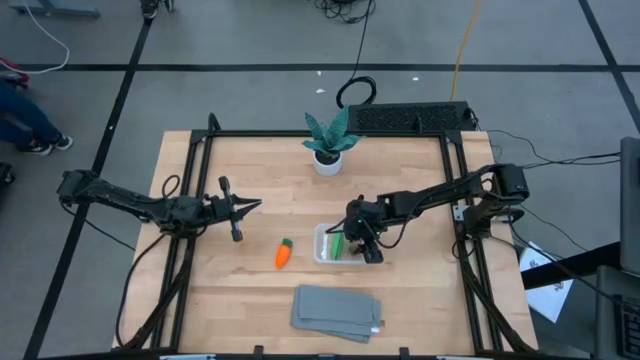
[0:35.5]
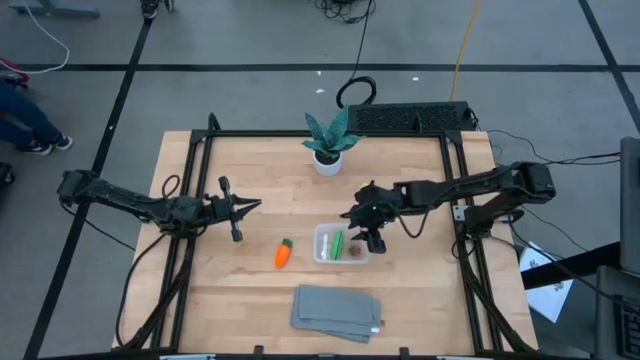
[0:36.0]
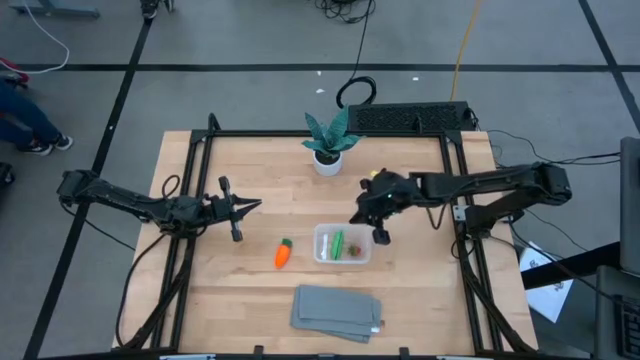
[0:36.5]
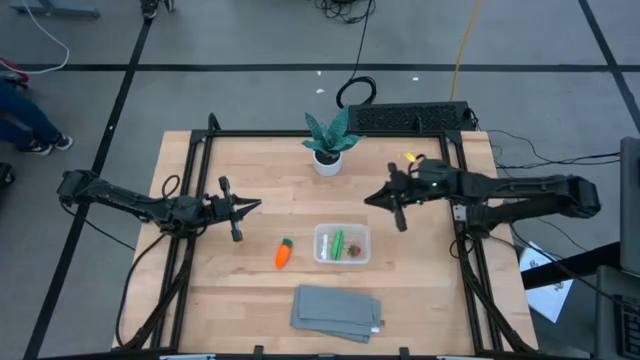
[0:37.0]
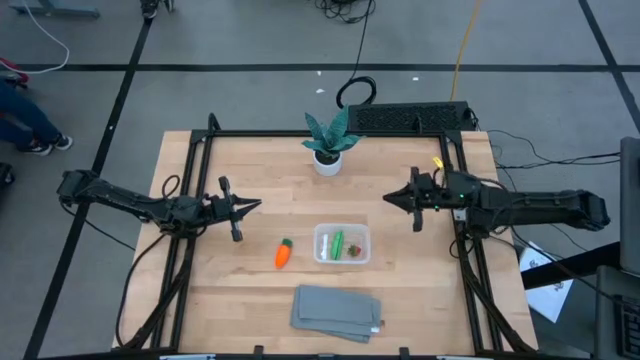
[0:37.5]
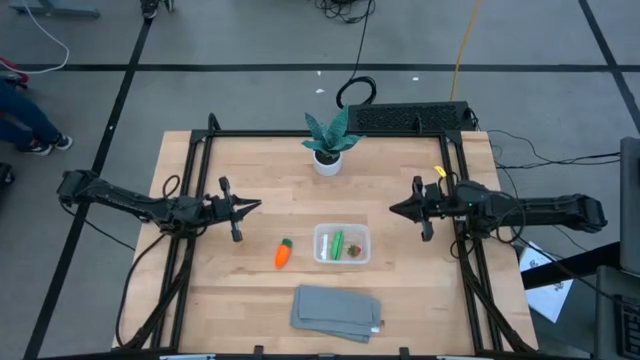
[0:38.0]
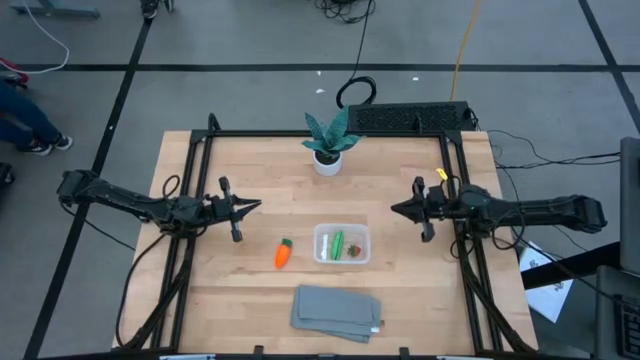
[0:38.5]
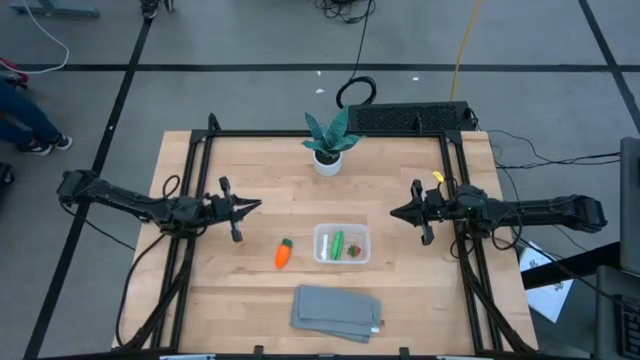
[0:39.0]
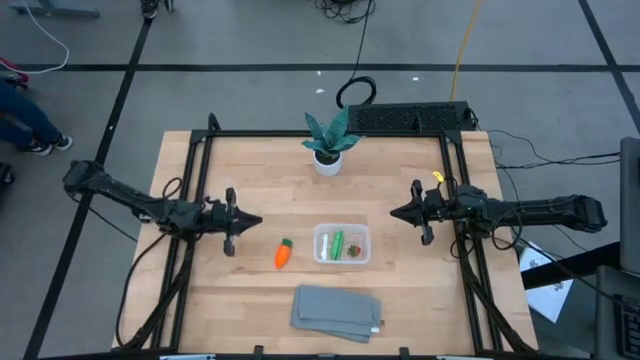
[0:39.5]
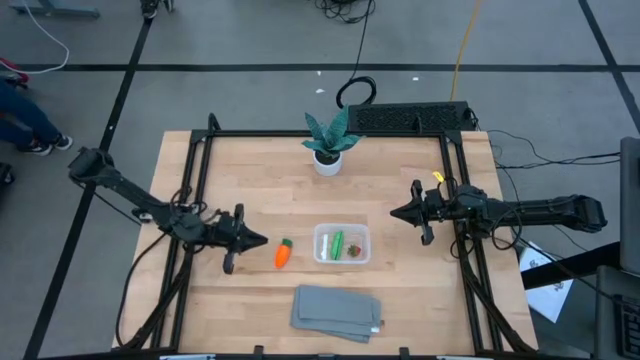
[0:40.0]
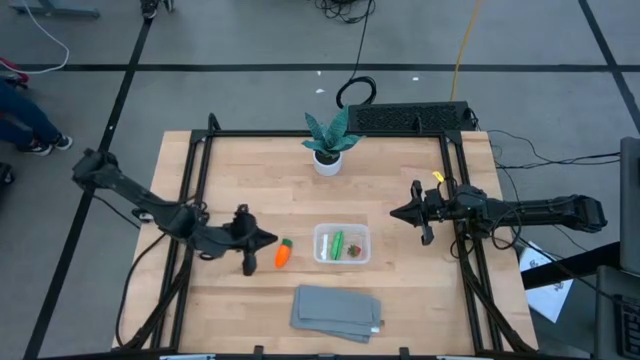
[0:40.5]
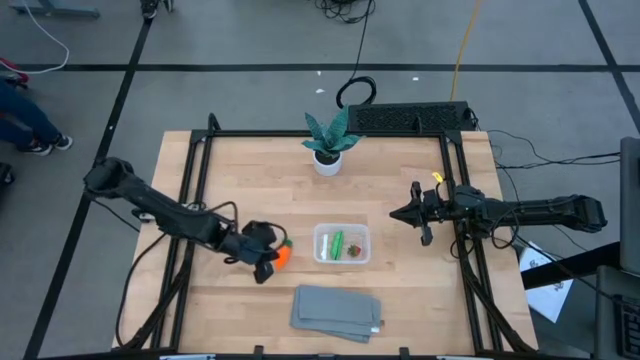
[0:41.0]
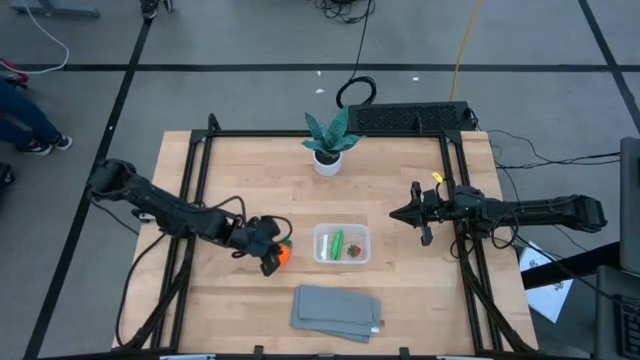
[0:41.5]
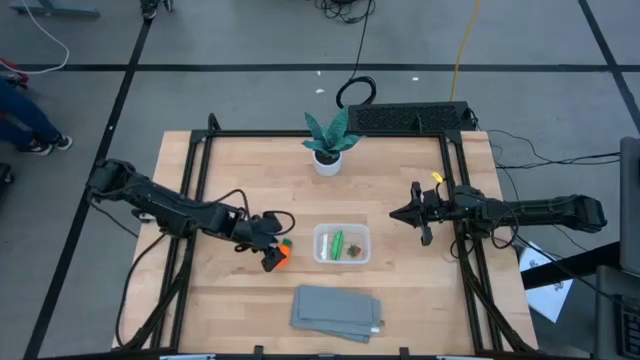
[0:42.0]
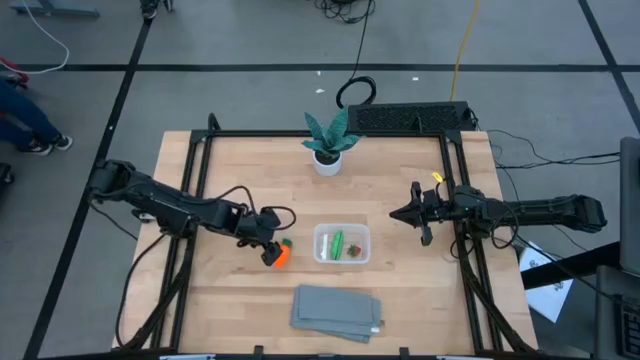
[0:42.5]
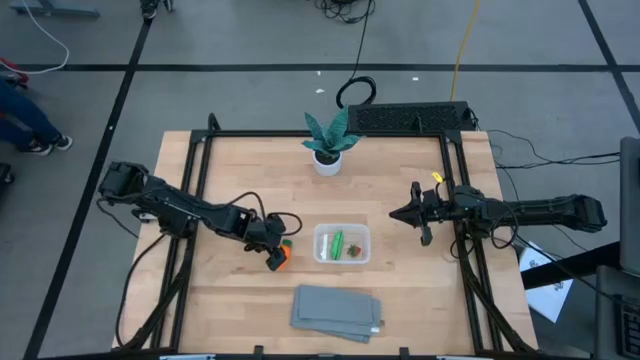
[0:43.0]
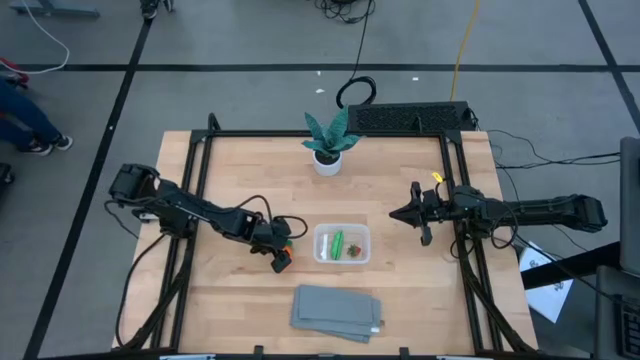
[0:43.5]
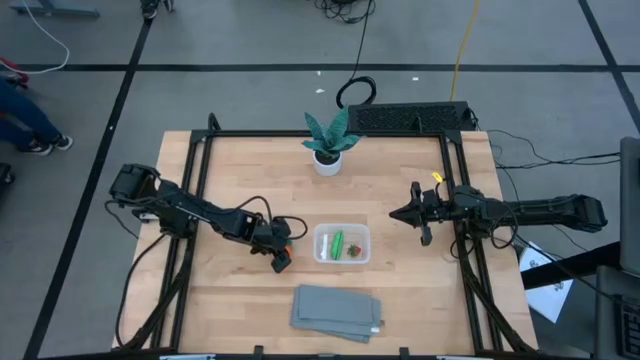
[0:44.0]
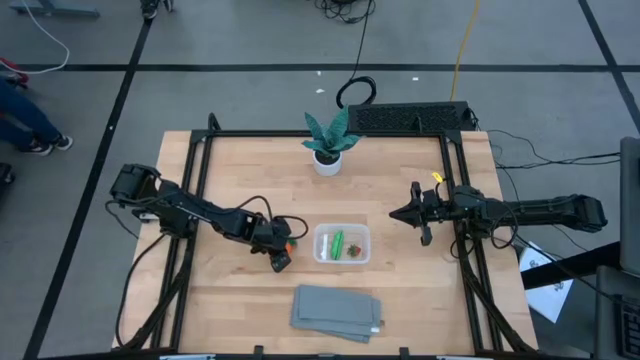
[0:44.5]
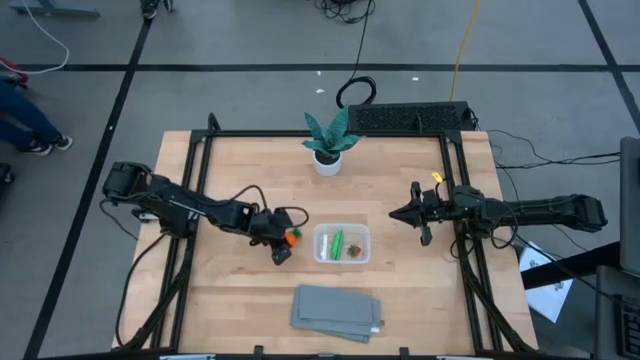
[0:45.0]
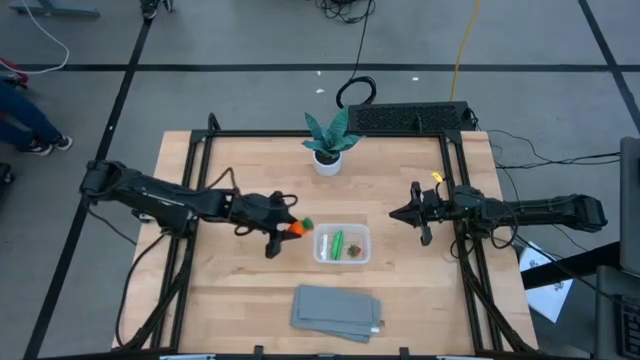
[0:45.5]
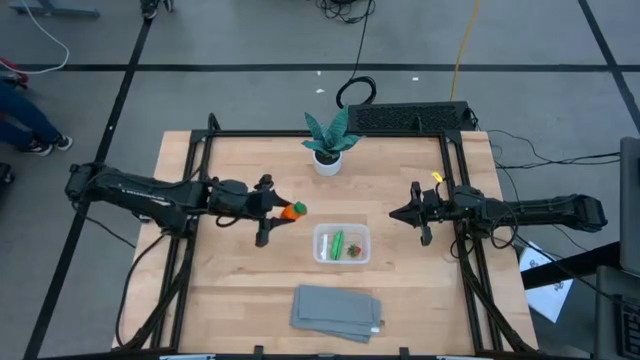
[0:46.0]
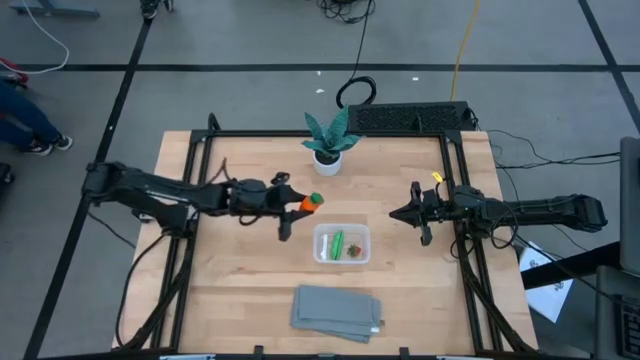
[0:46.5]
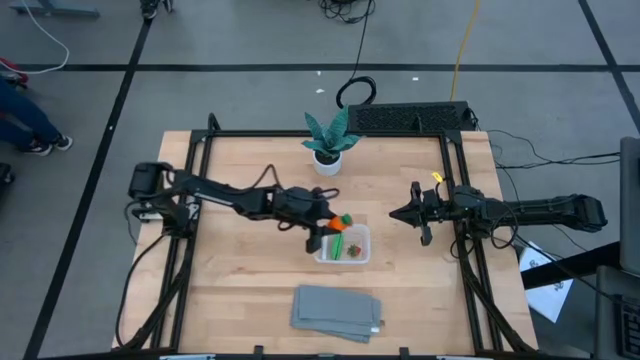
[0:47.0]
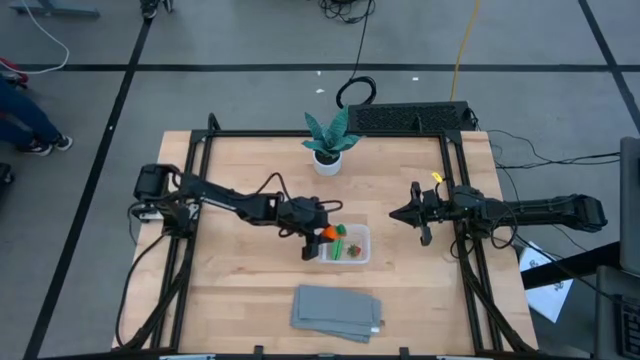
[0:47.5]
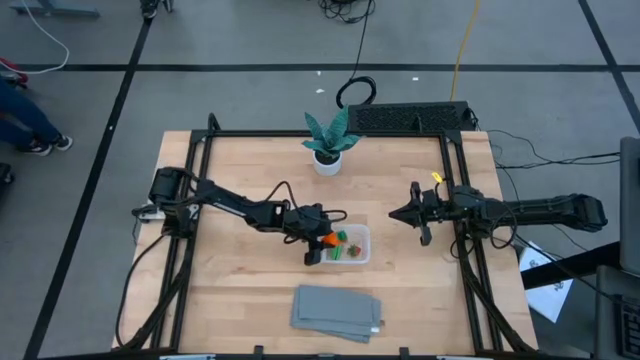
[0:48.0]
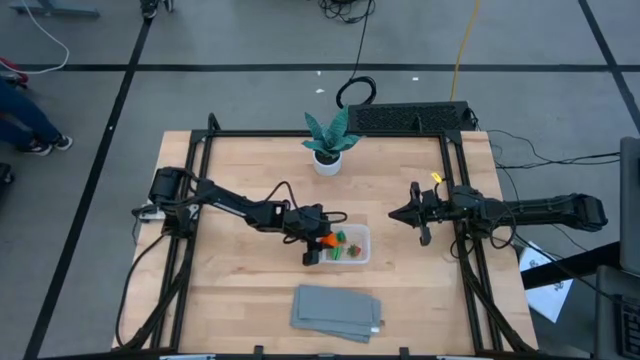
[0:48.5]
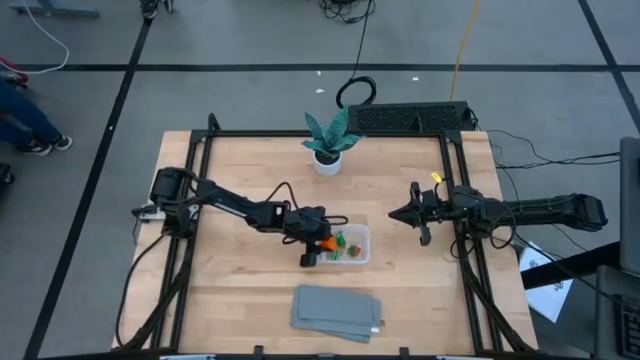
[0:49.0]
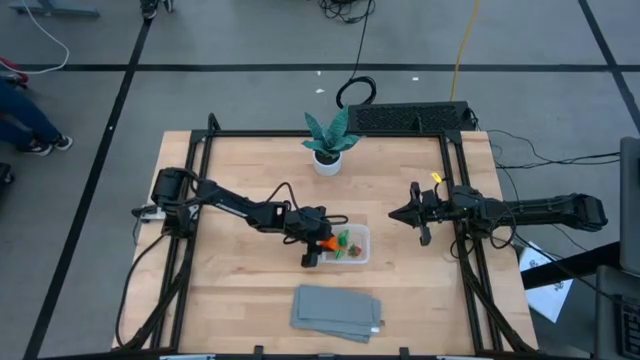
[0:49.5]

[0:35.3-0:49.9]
Task: Pick and placing Produce into tupperware
Put the orange carrot into the transparent container

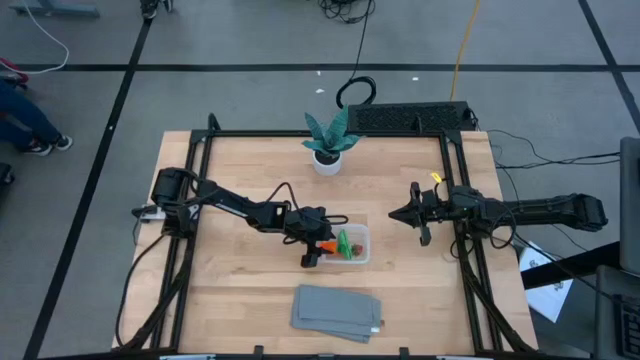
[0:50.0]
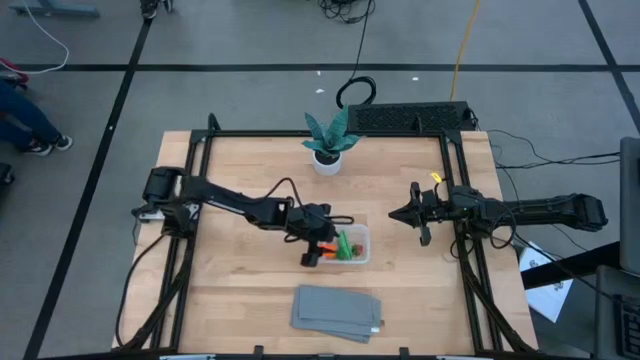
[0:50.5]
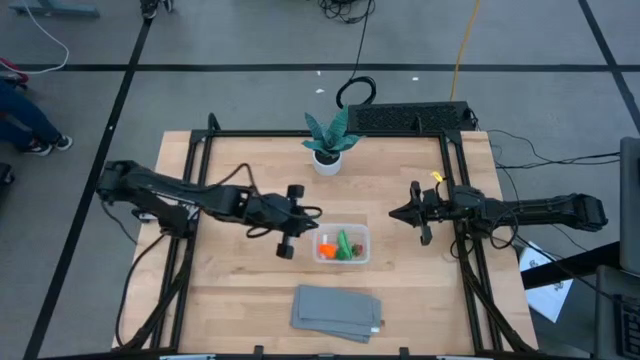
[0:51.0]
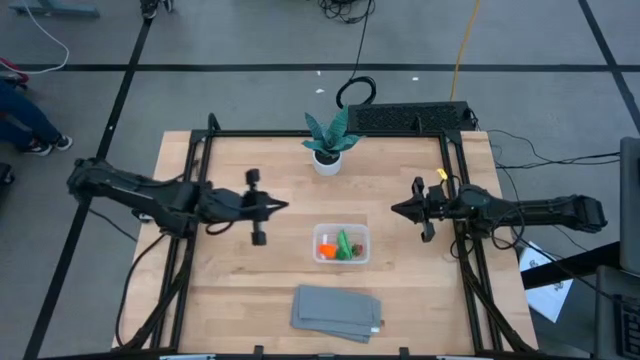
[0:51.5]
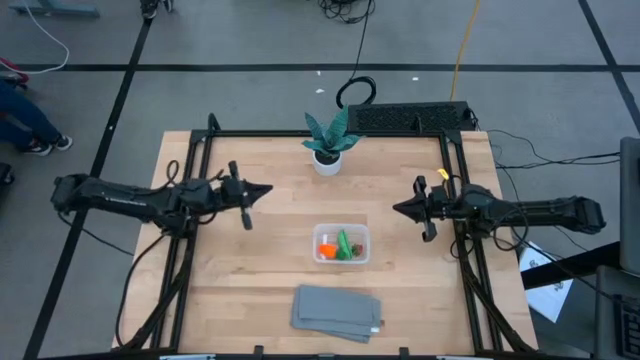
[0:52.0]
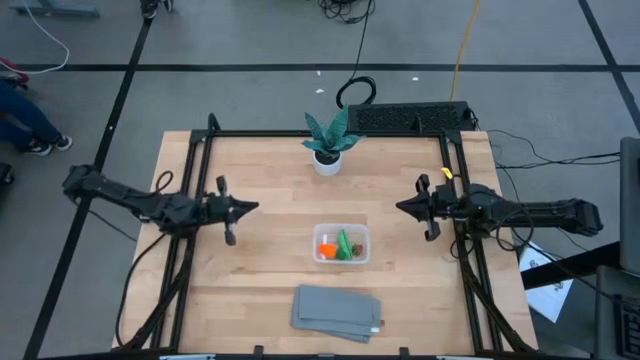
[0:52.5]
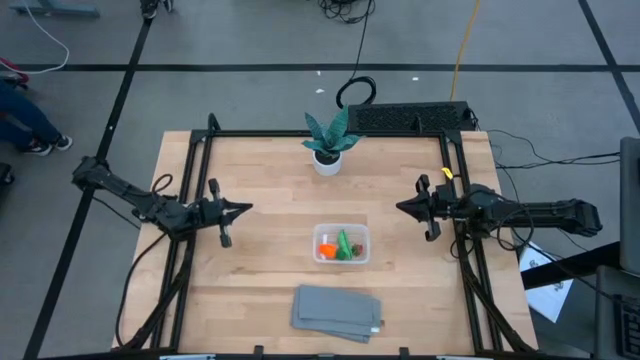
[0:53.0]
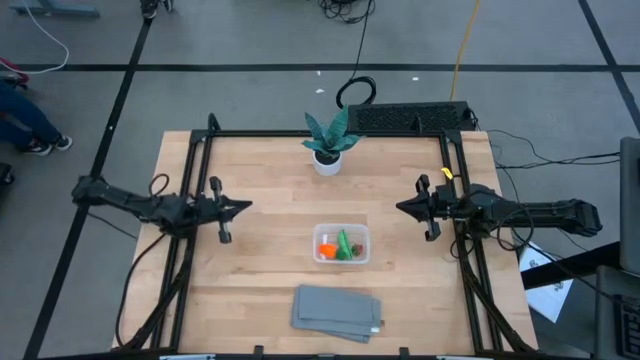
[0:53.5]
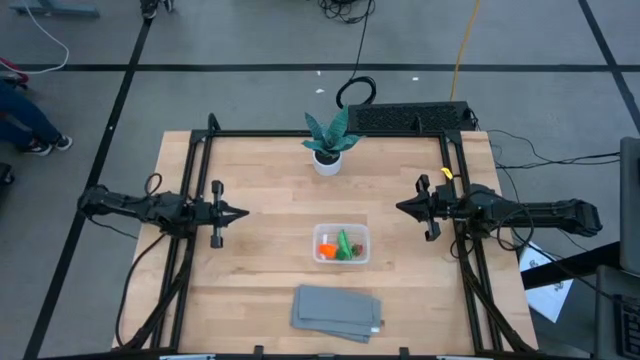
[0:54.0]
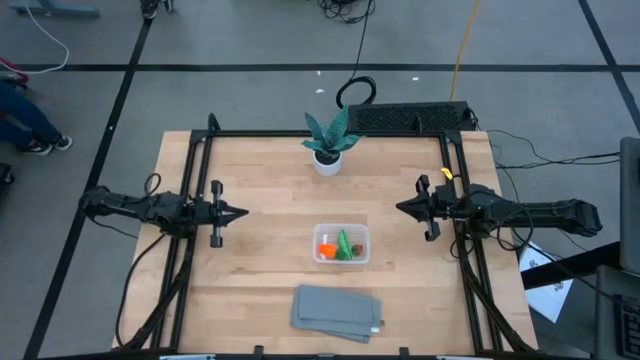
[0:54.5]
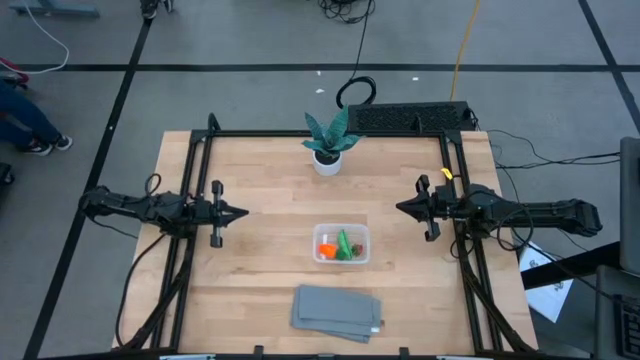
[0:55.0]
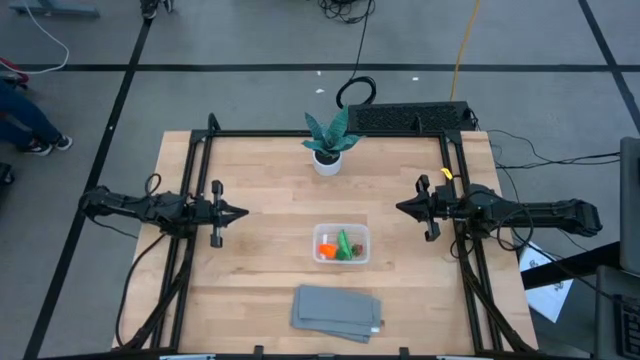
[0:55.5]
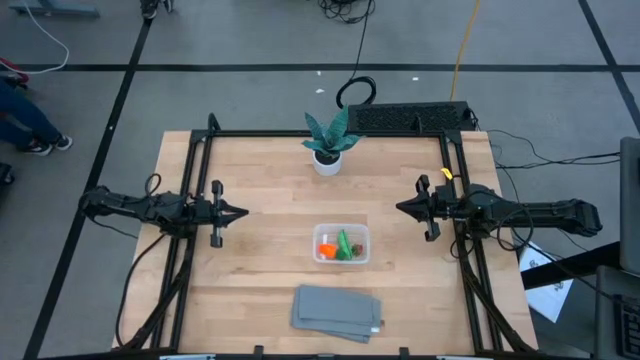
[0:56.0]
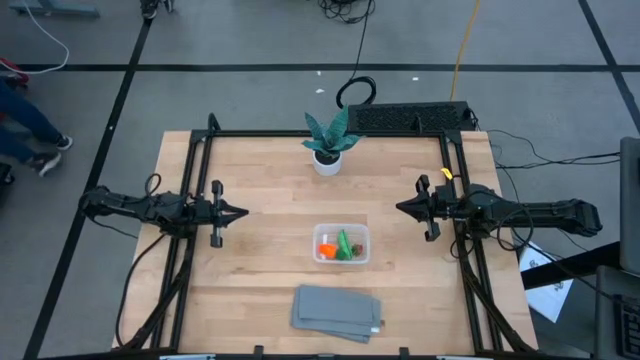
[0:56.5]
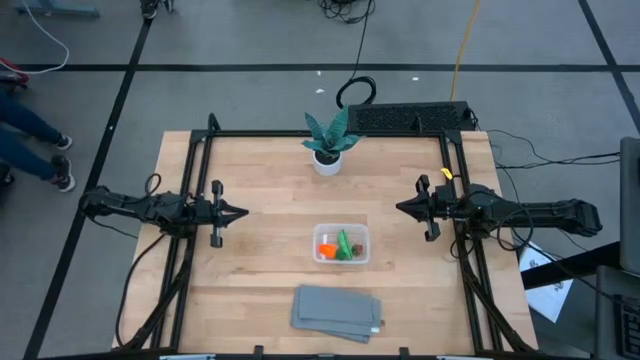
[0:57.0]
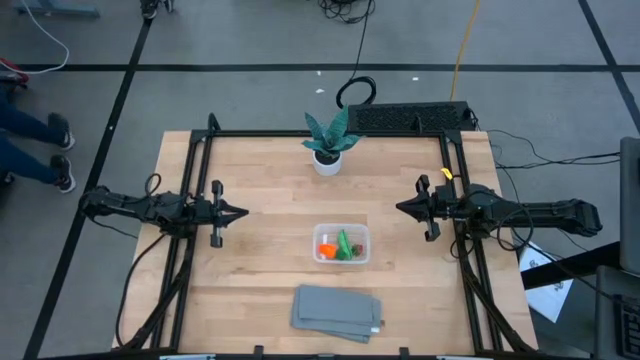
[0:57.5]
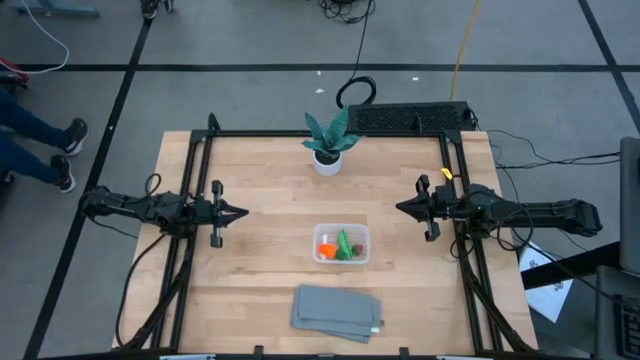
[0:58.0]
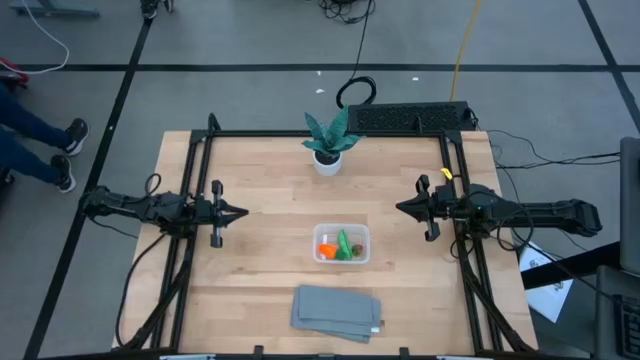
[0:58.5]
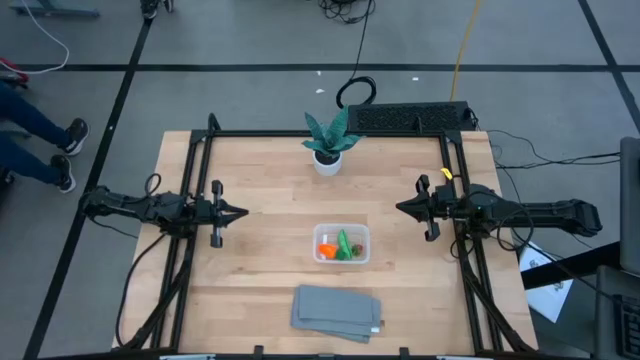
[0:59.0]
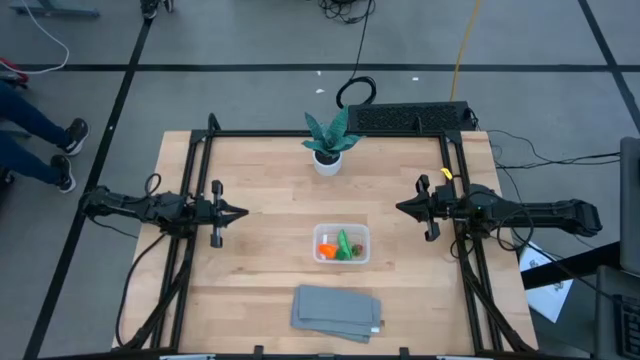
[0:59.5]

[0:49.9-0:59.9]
Return to Home Position
